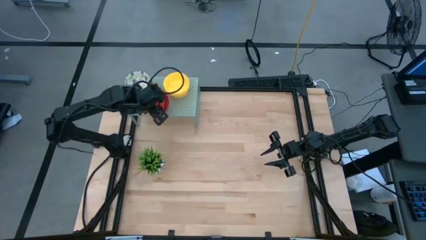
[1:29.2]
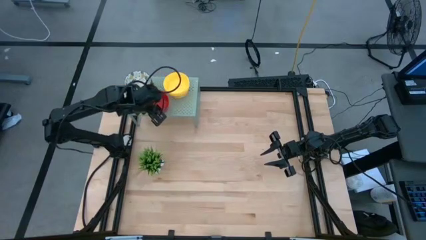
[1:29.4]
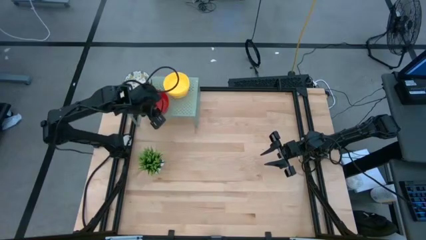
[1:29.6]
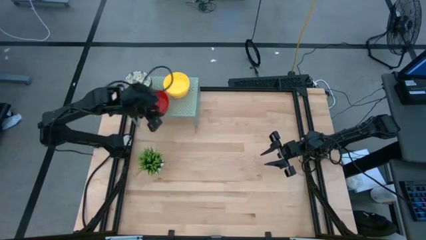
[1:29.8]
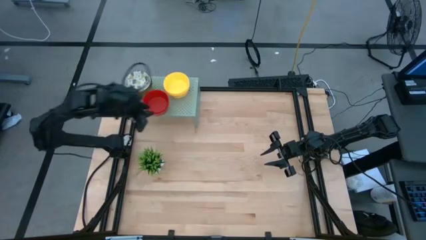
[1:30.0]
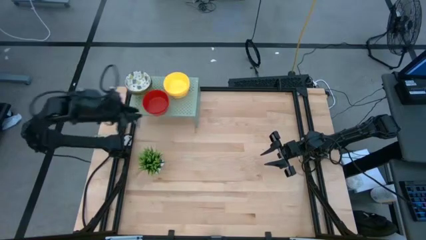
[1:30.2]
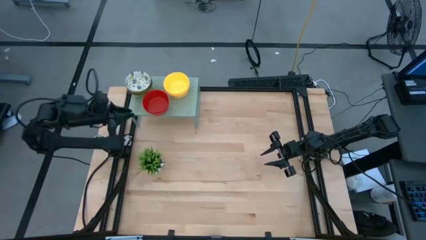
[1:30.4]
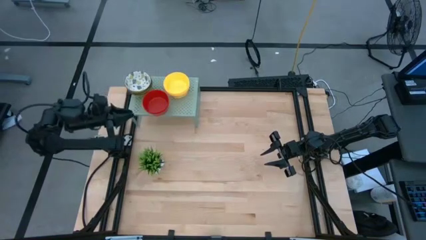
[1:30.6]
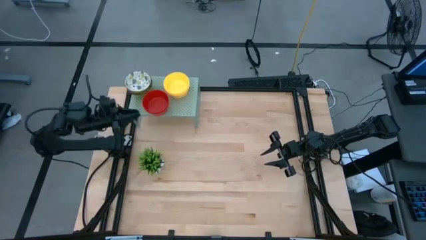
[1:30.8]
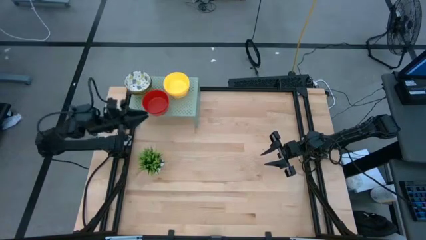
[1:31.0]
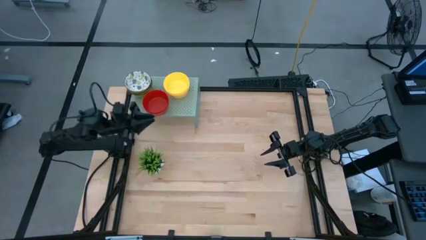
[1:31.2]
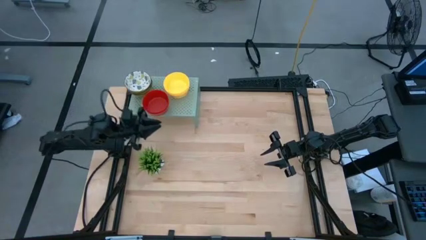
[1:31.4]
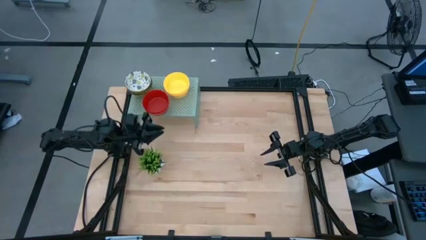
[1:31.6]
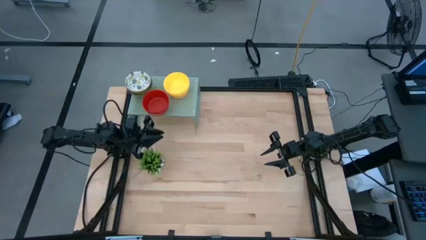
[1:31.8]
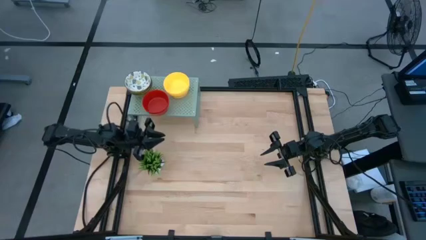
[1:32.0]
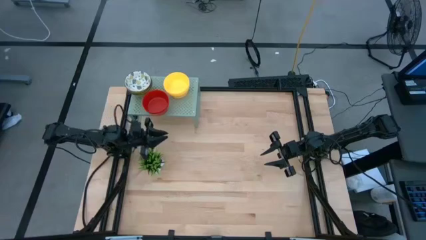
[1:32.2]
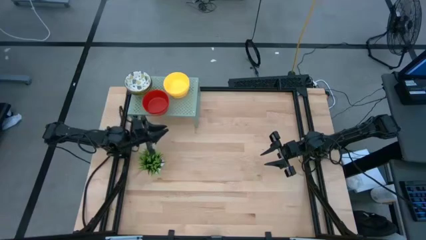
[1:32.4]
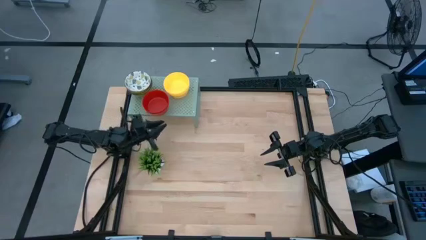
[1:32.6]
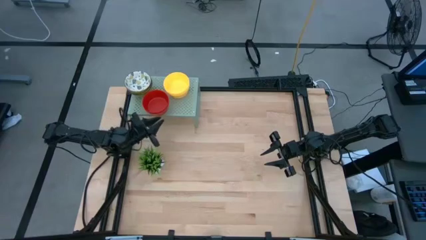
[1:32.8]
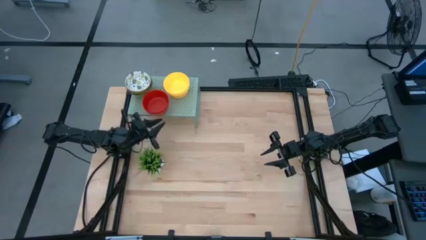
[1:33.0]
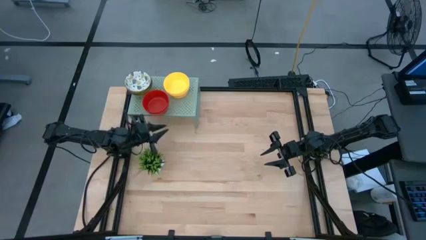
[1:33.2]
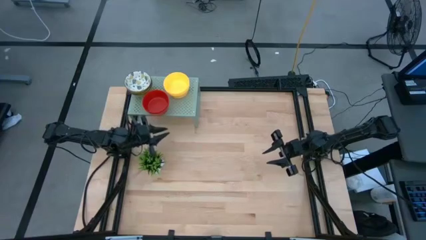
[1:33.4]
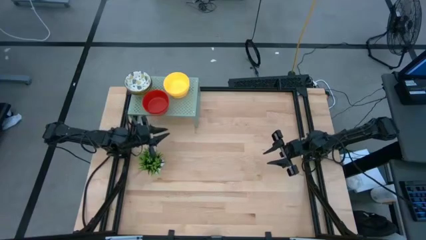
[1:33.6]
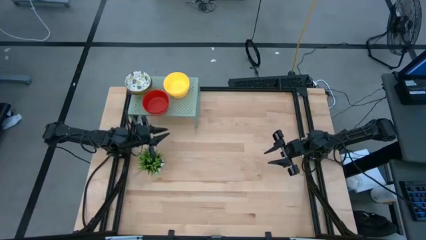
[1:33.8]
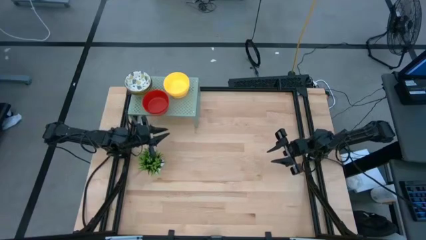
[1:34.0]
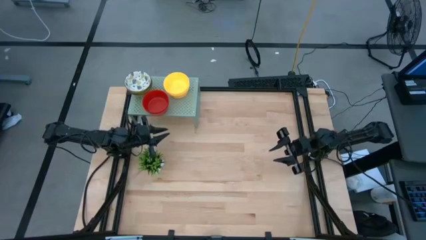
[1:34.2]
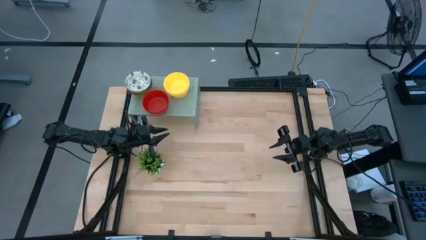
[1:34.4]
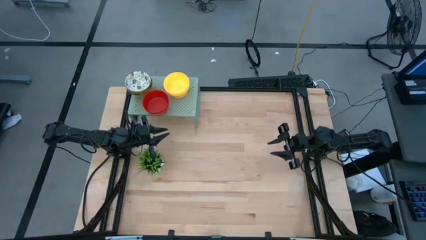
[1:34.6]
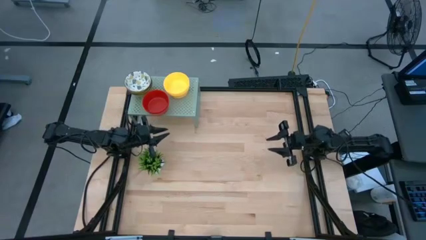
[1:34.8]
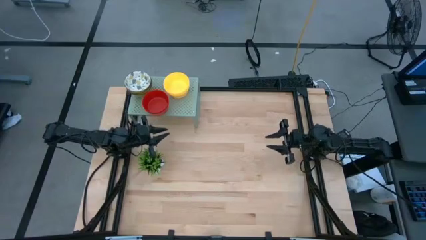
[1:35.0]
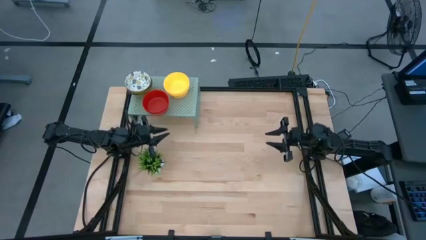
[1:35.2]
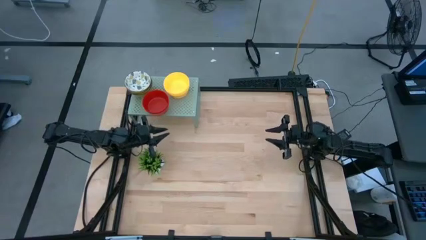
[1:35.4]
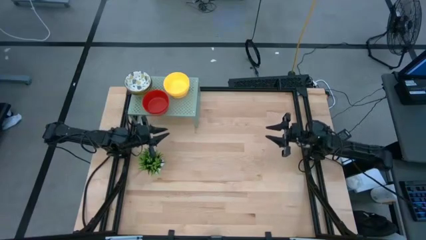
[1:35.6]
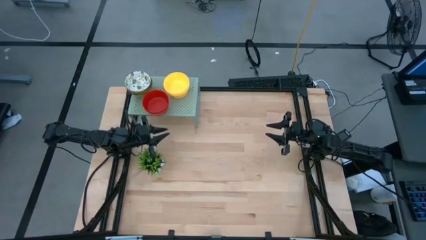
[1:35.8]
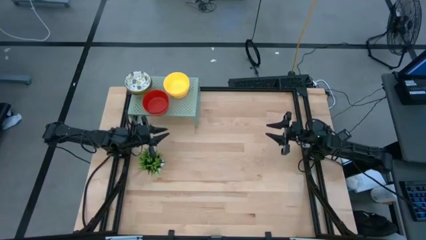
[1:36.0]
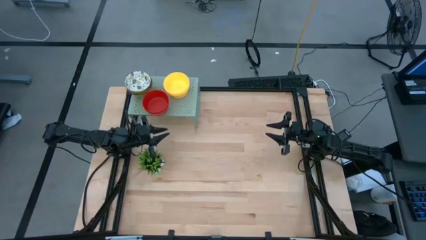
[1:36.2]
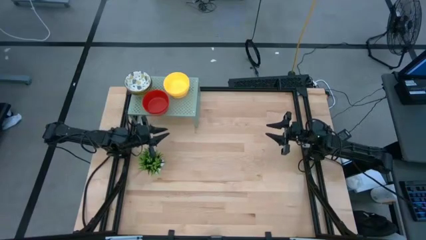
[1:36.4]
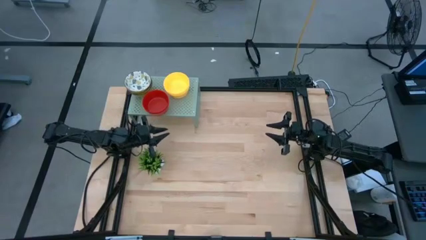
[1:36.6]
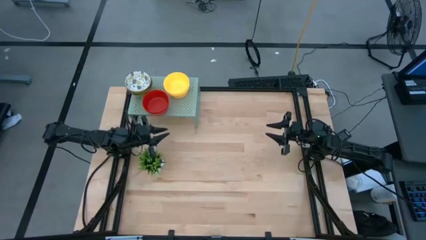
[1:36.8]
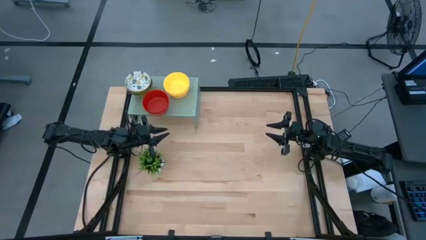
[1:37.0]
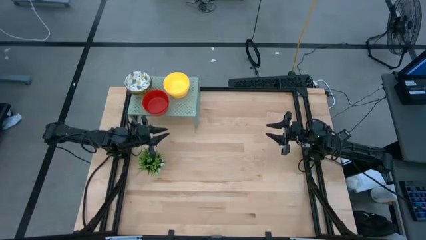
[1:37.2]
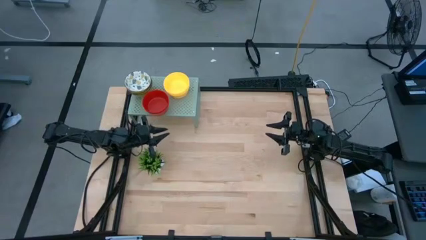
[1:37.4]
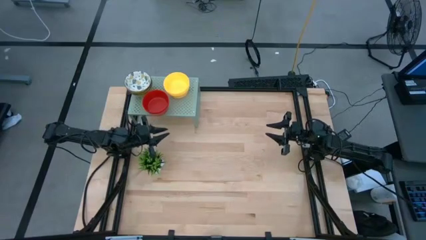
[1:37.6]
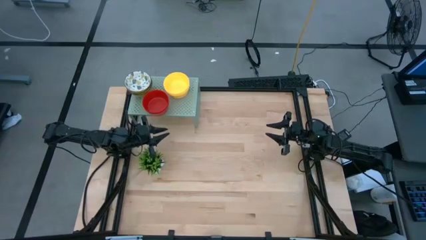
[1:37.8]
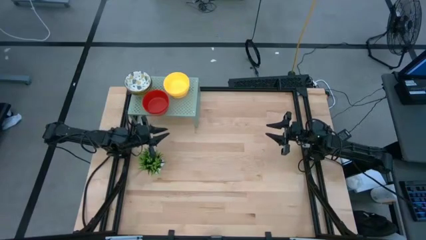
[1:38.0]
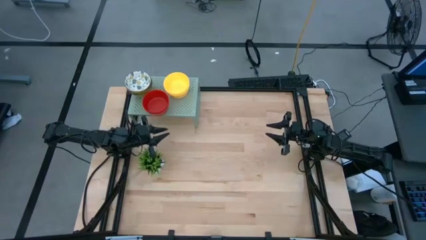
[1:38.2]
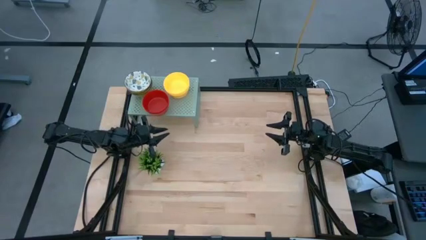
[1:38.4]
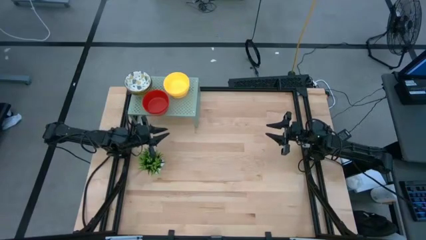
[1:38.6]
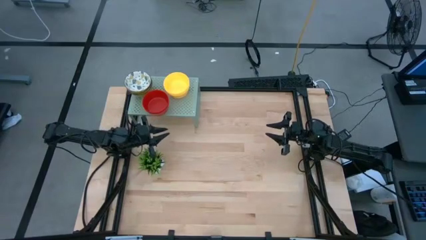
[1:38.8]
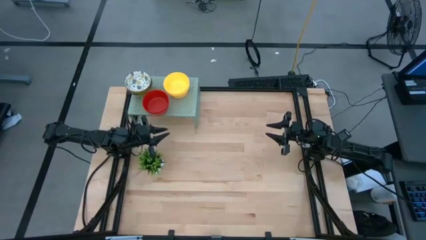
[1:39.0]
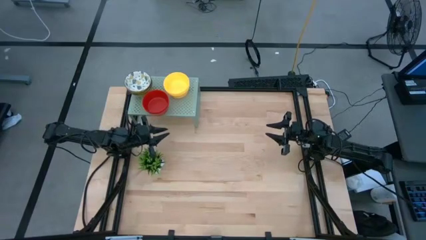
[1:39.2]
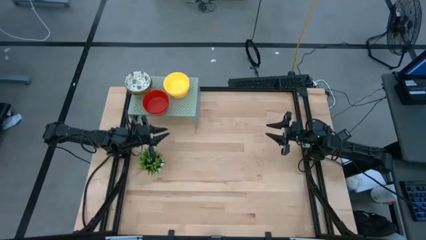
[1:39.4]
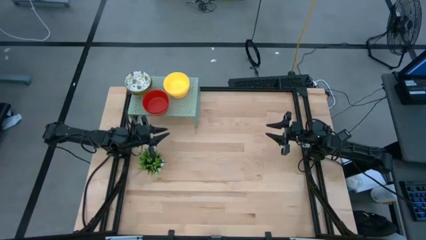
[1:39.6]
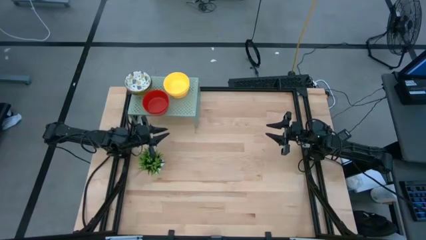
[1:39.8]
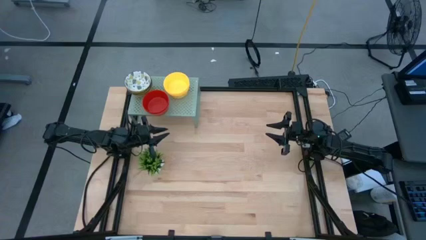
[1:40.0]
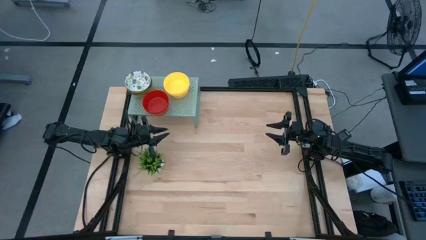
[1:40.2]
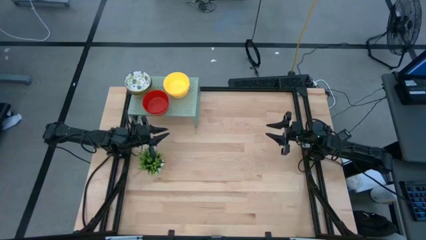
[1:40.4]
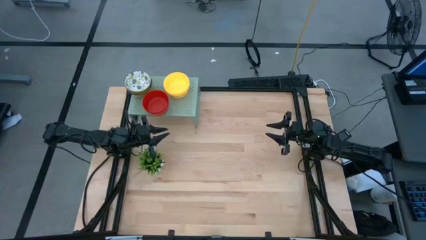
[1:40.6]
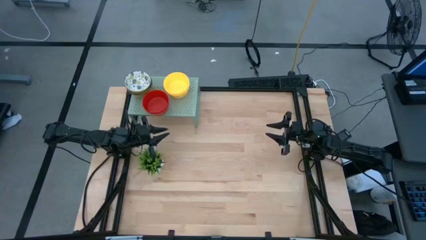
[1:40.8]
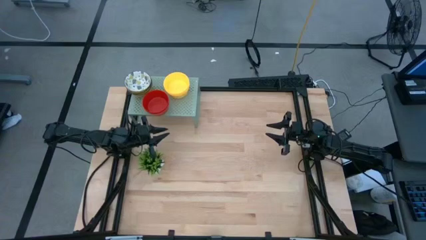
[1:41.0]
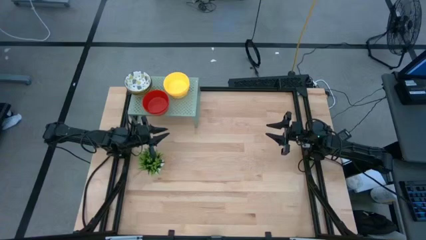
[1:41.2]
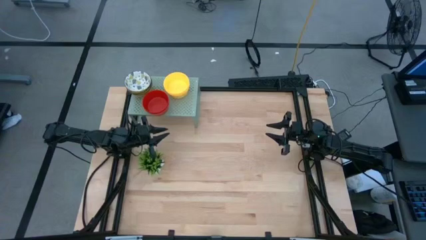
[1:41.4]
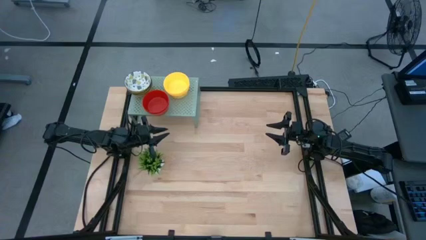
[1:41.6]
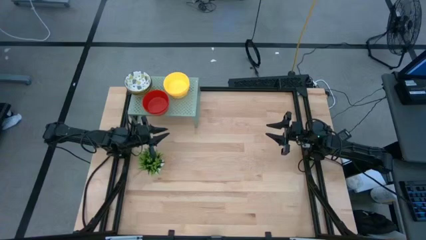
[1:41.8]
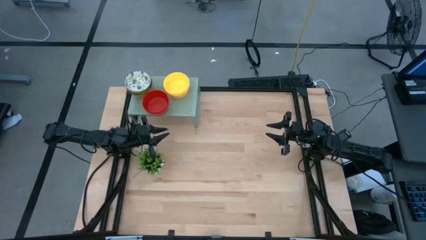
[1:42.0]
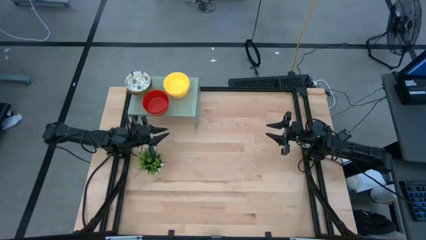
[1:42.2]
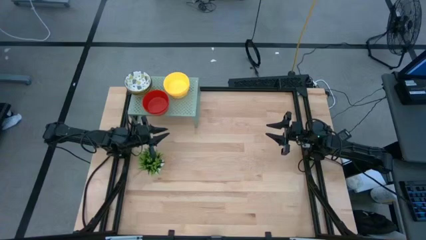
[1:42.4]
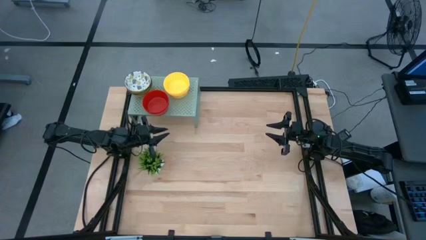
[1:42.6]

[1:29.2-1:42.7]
Task: Pick & Place Mini bowls
Return to Home Position

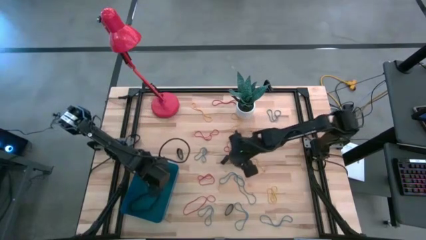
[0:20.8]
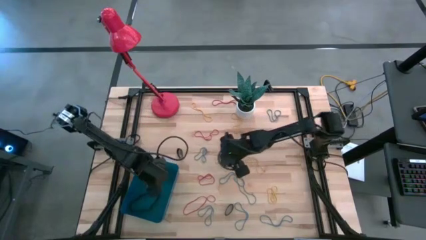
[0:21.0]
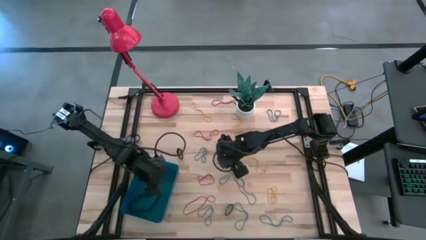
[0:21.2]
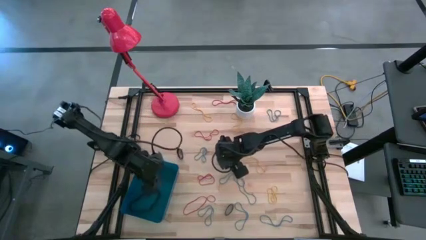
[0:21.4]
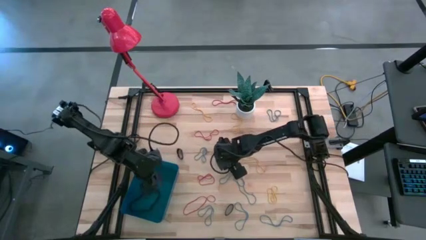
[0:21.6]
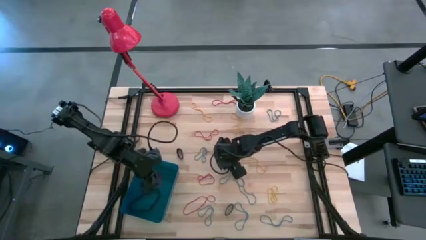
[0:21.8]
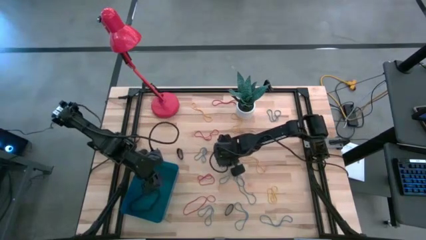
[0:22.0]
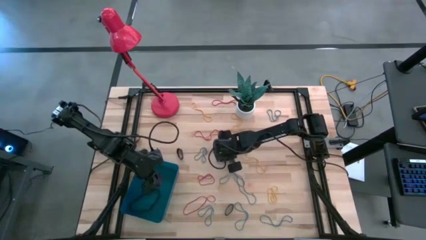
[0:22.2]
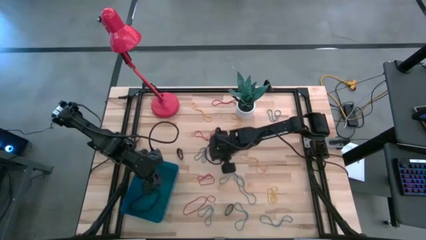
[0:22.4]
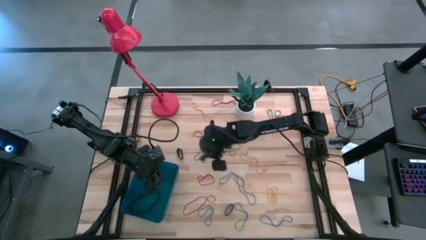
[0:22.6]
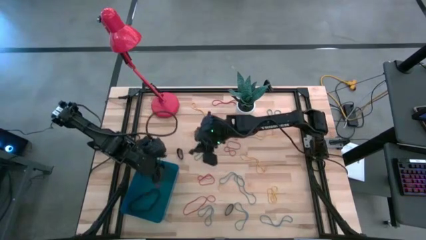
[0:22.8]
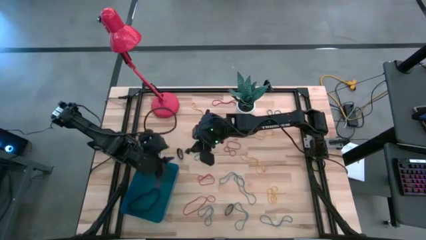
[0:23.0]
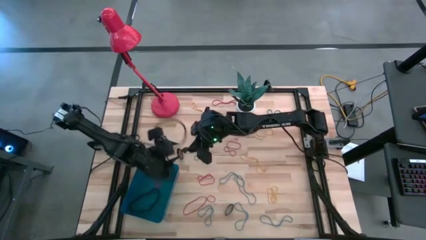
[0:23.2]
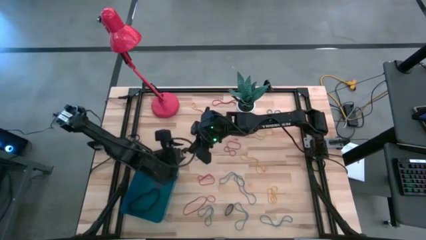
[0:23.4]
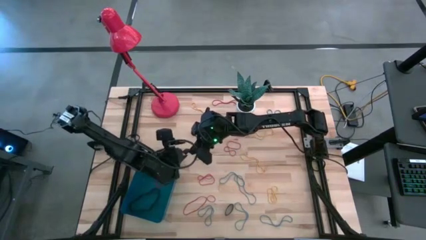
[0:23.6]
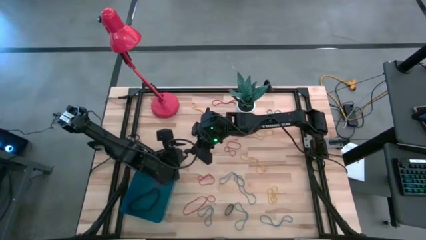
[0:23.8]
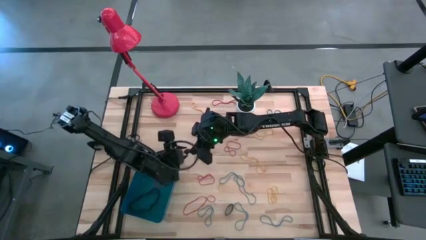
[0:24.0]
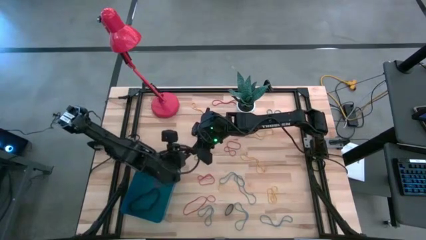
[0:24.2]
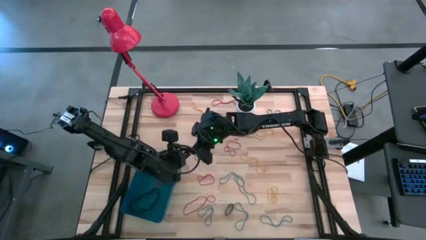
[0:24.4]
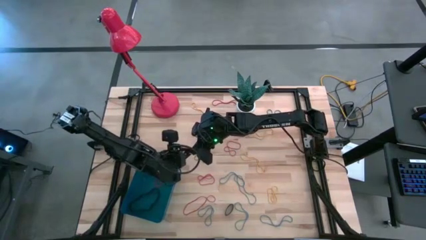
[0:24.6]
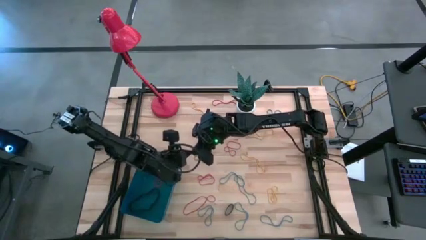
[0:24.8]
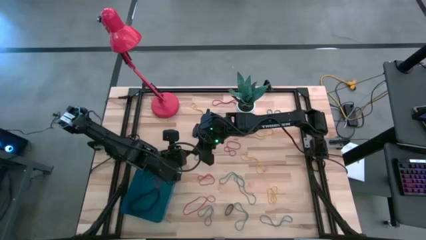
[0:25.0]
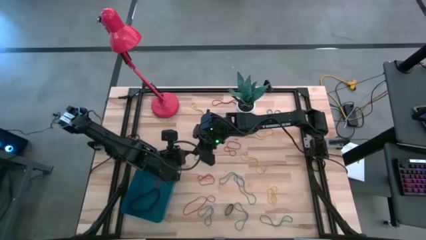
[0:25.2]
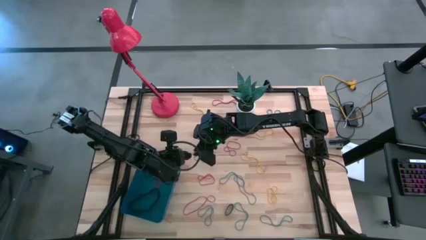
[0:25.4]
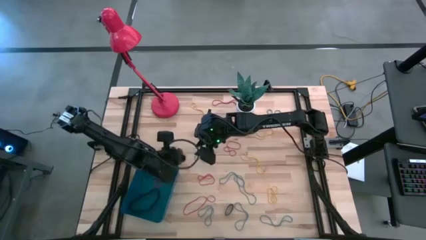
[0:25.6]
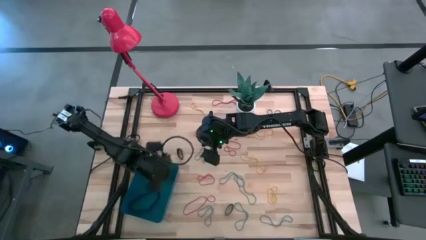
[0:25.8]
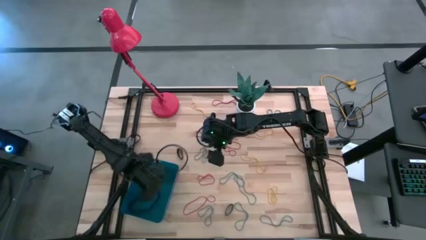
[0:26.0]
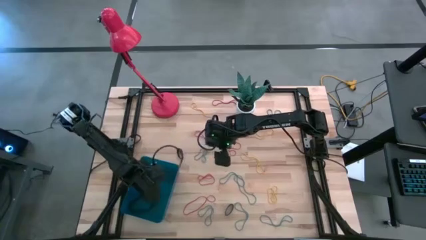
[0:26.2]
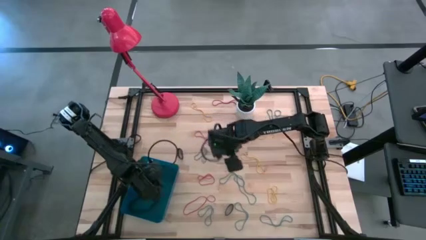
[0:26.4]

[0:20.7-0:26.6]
Task: Pick and place rubber bands into bin
Put the black rubber band into the blue bin
